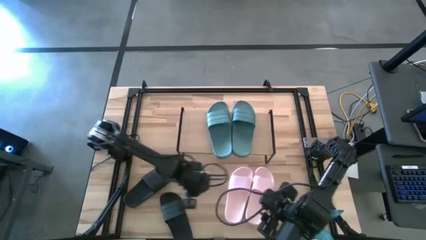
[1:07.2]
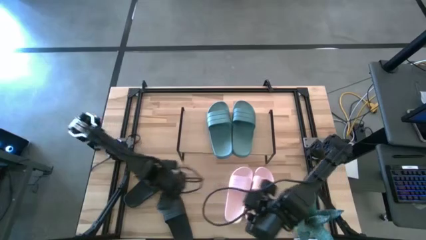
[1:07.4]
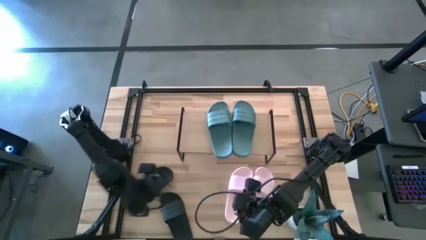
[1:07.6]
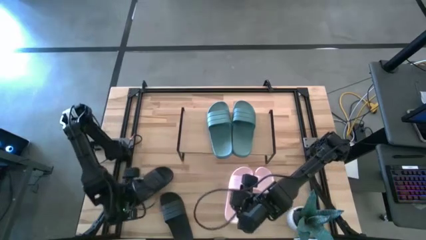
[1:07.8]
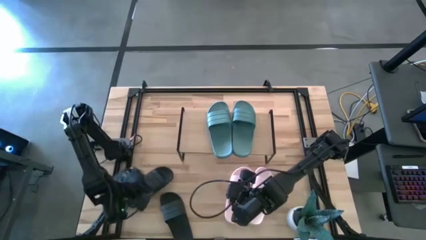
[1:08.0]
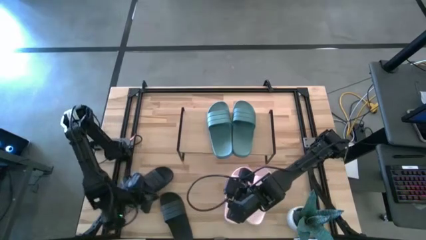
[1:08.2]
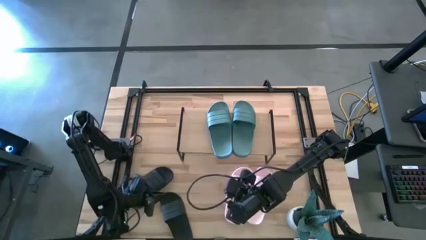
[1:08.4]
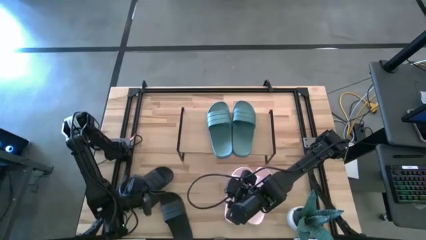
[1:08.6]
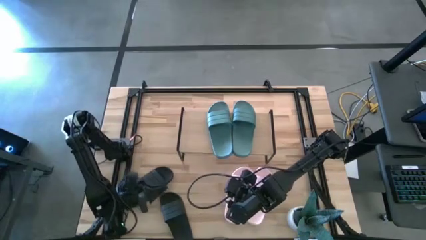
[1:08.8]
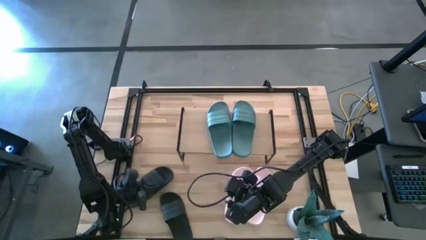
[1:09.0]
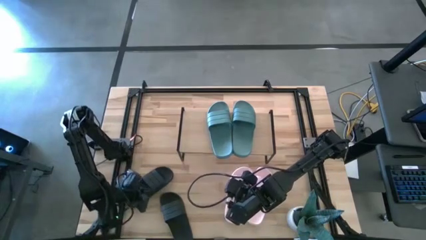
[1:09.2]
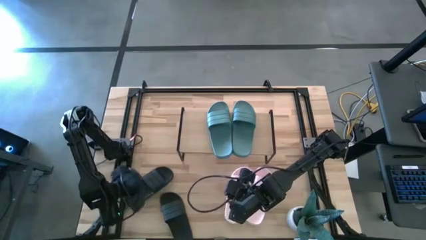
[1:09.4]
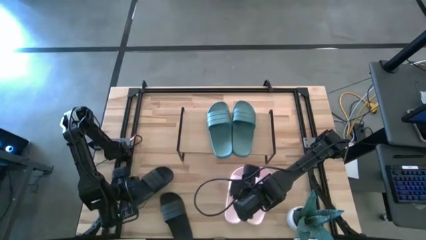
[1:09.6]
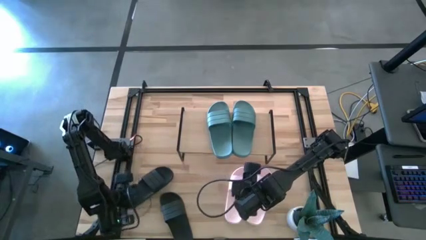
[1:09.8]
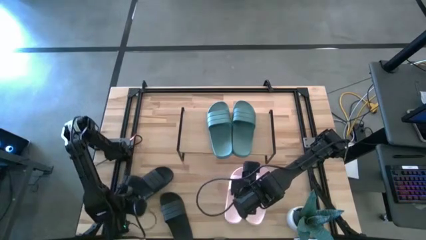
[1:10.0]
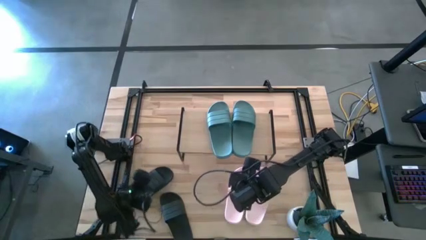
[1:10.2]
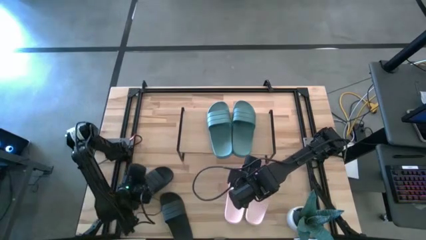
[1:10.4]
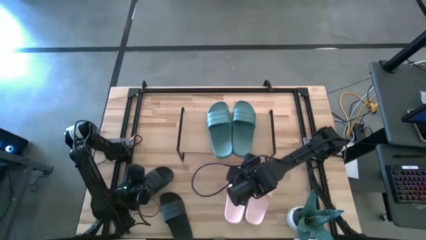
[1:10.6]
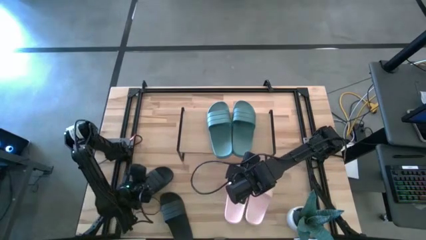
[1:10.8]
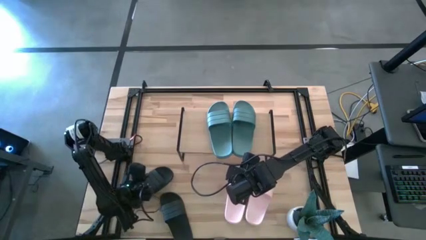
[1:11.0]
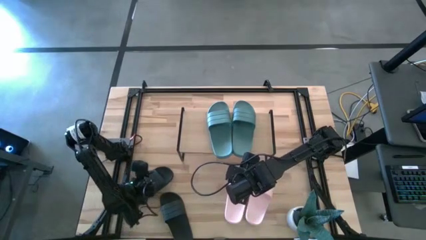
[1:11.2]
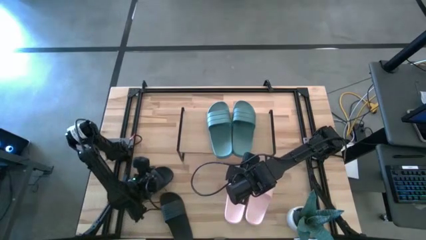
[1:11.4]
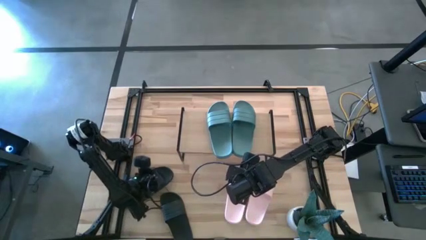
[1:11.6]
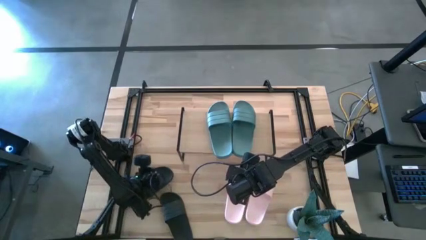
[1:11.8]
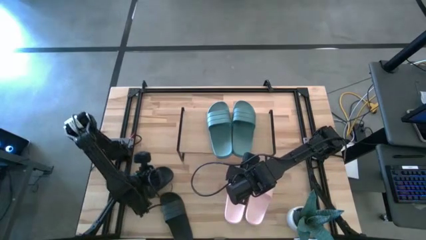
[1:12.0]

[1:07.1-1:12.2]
Task: Pick and place slides into the shelf
Put the top black slipper under the shelf

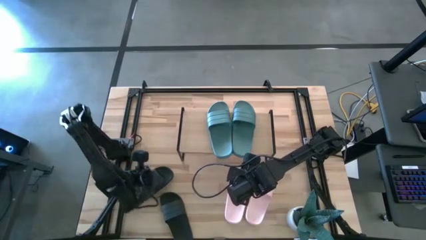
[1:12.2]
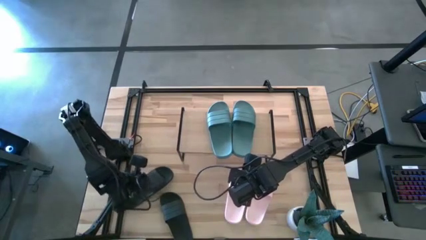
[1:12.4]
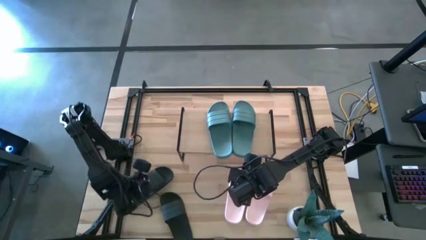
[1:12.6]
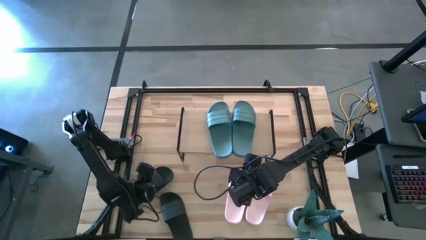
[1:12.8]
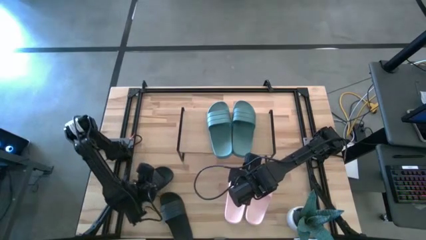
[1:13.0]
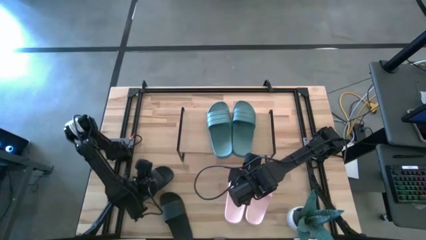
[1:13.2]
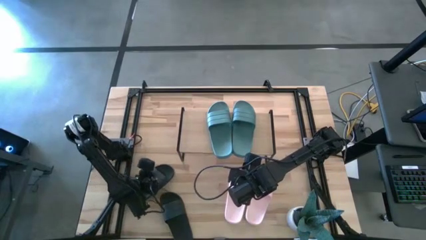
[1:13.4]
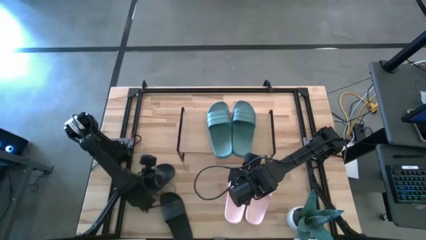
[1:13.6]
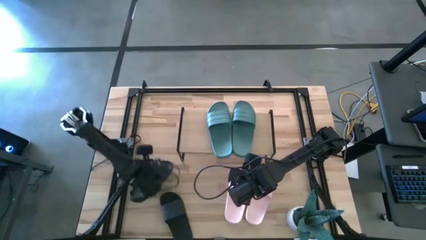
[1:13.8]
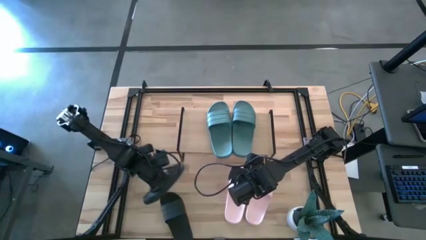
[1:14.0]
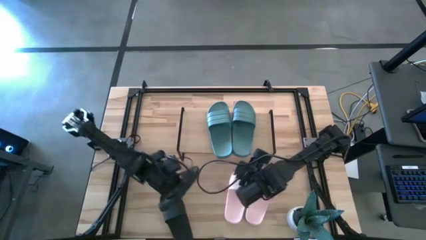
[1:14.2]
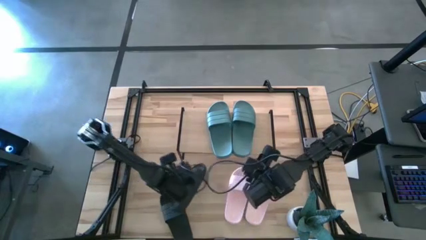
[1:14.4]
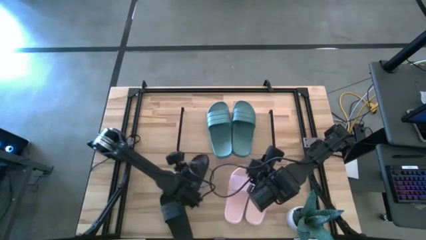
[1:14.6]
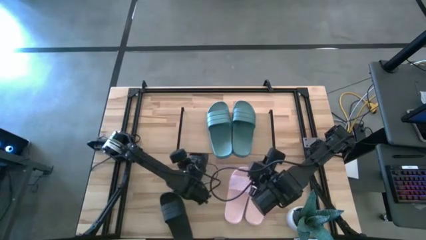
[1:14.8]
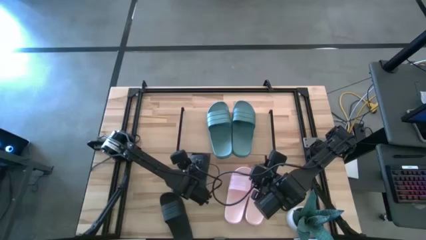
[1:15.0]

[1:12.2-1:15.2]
Put the top black slipper under the shelf

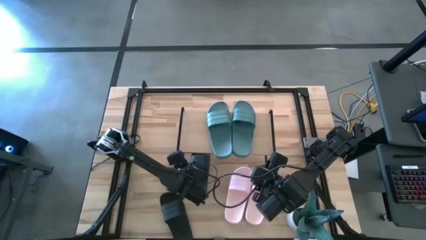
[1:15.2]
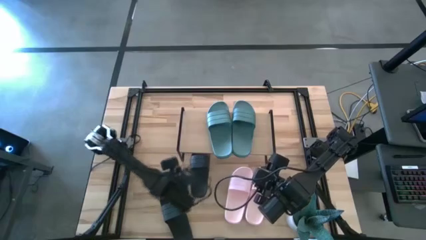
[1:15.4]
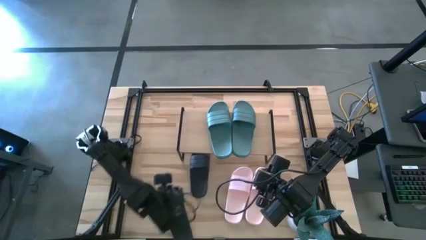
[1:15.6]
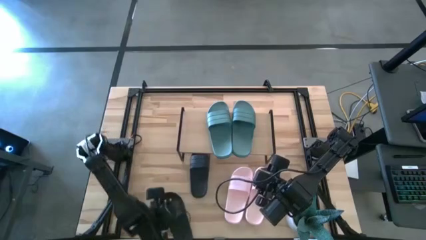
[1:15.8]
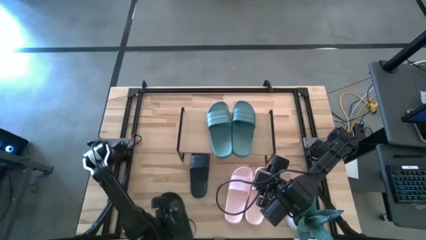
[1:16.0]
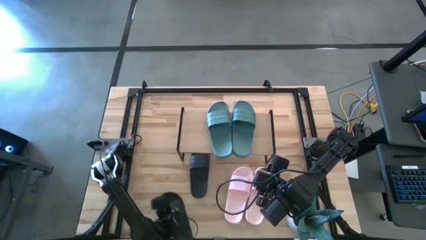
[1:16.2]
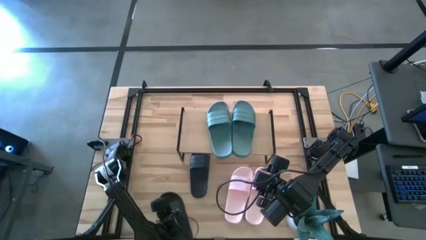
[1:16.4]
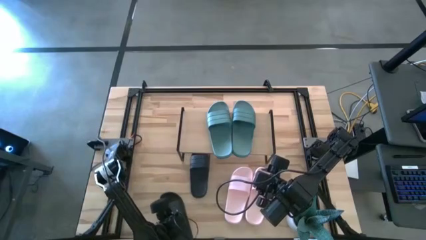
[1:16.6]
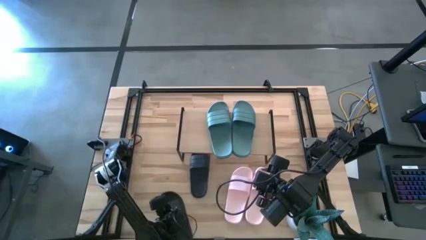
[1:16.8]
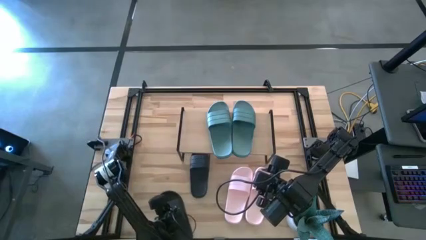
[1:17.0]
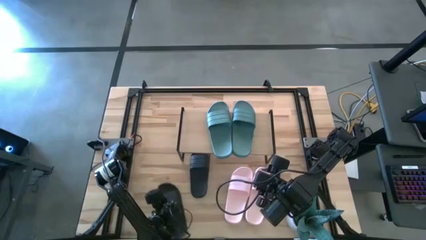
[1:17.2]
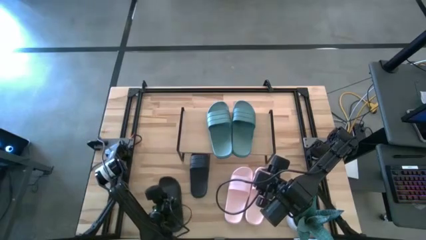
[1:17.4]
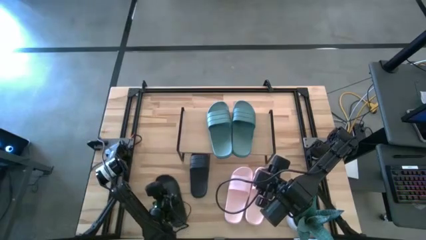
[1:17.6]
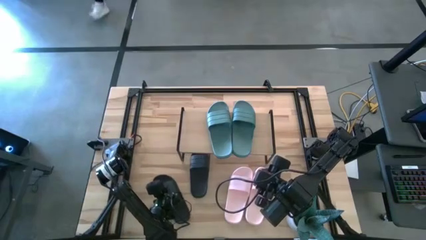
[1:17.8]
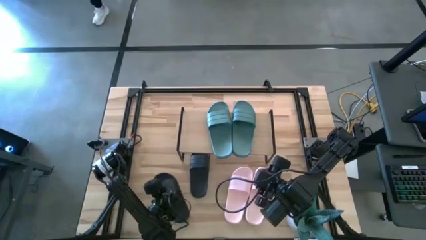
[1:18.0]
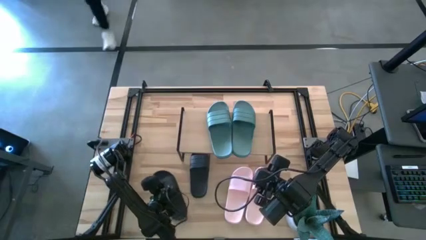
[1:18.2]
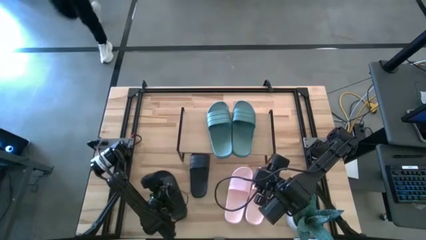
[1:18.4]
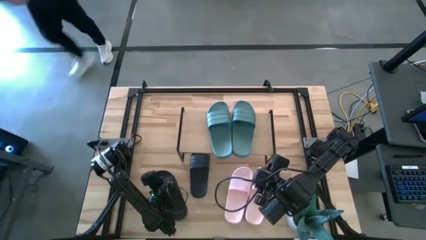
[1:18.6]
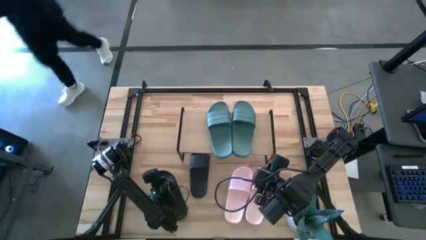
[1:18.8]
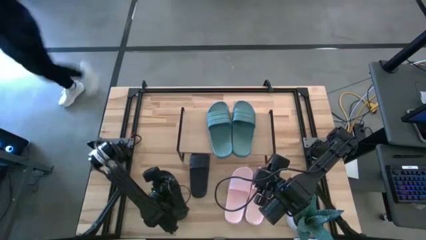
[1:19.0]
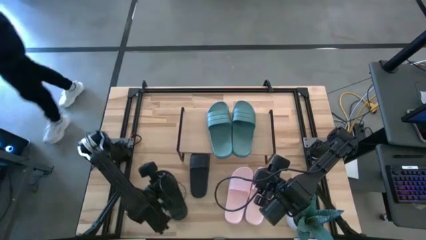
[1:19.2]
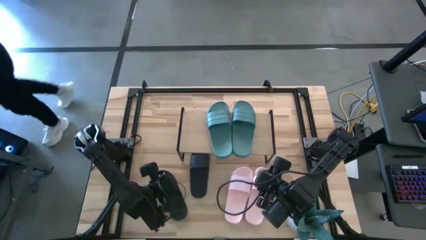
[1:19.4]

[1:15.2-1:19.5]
Move the black slipper to the middle of the table

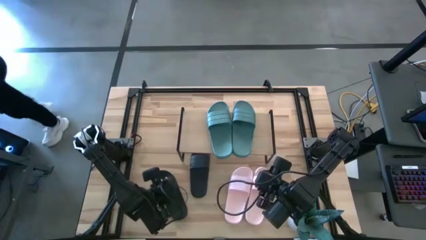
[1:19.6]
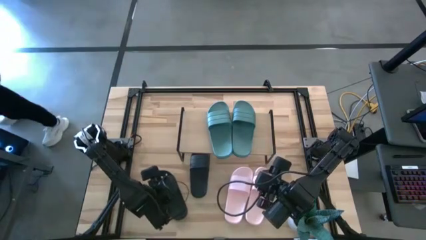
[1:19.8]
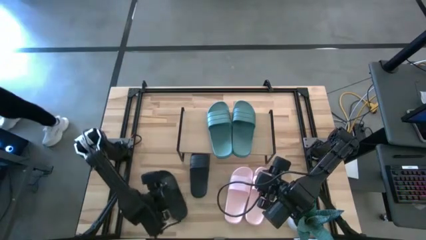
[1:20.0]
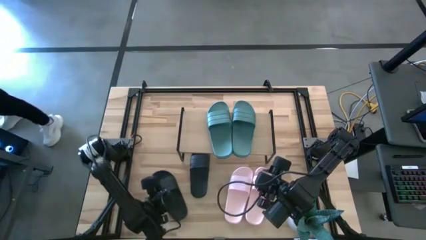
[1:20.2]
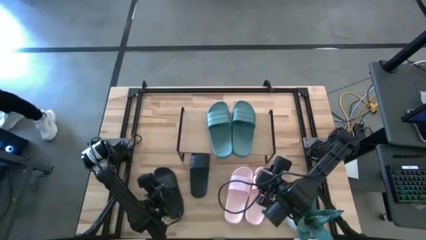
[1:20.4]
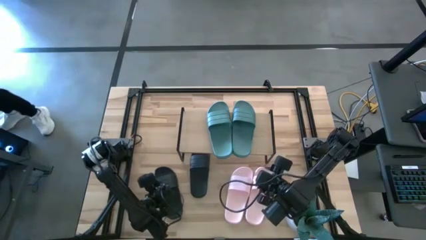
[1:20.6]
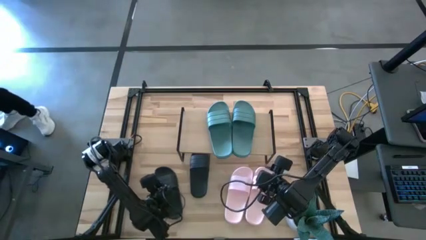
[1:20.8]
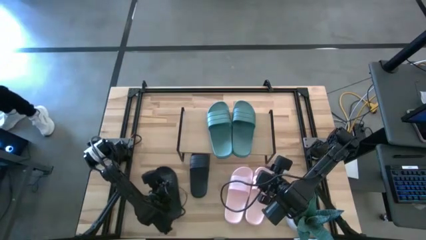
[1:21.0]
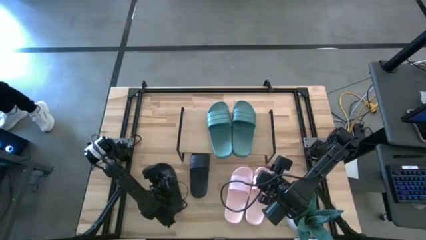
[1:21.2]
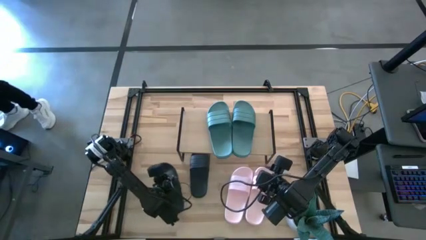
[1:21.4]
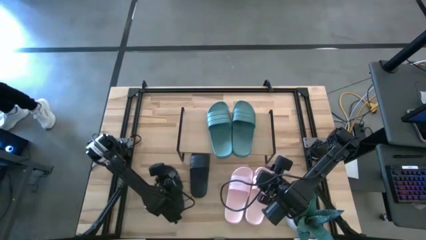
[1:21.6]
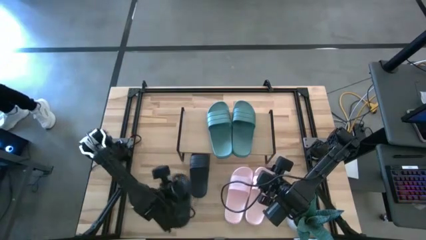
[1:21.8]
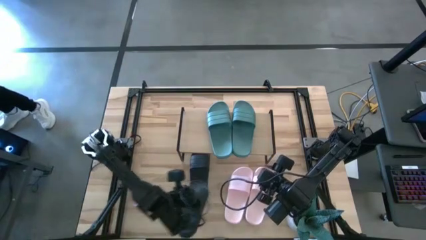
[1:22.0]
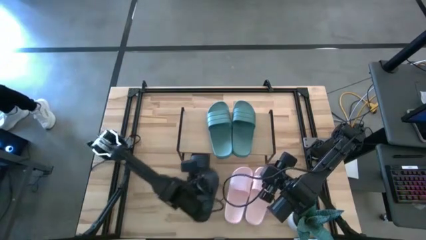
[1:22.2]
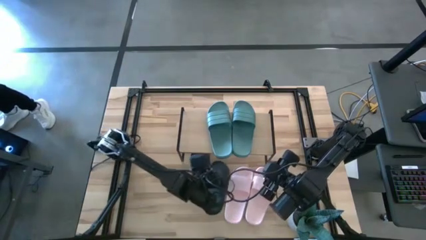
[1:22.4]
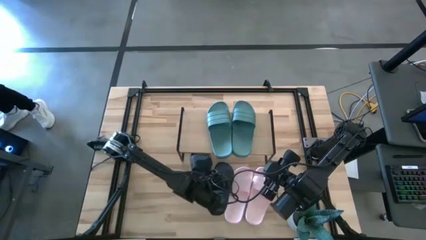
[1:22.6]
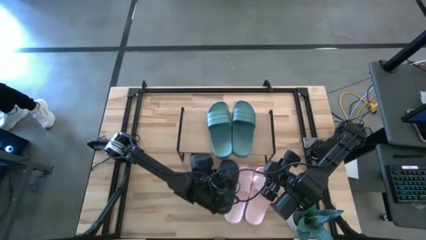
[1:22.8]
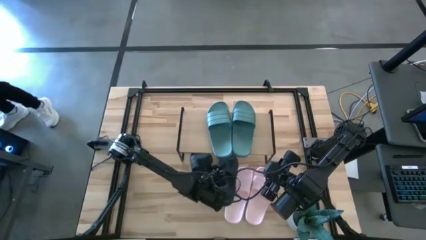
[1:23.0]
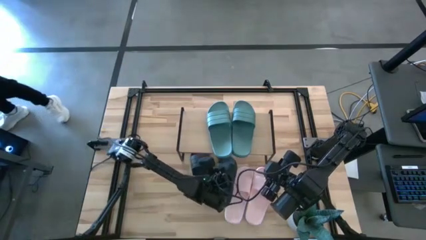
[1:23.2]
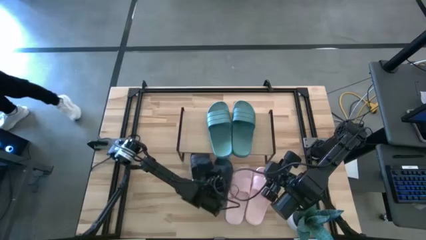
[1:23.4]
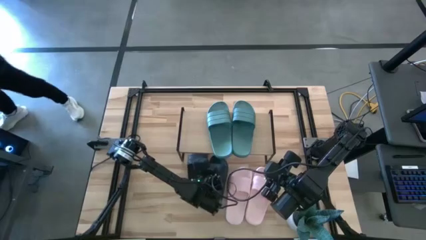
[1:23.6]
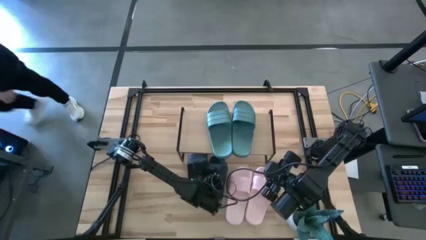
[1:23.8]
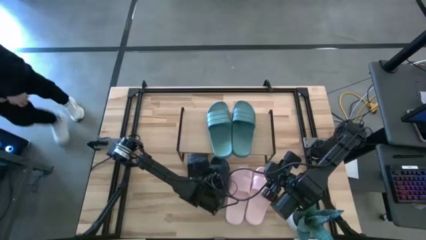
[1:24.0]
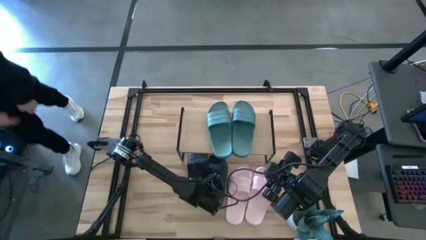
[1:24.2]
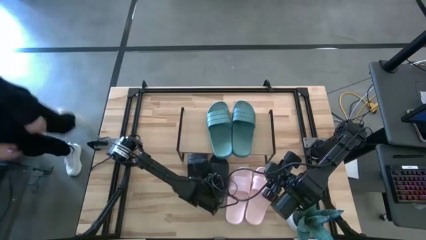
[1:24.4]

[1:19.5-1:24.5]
Move the black slipper to the middle of the table
